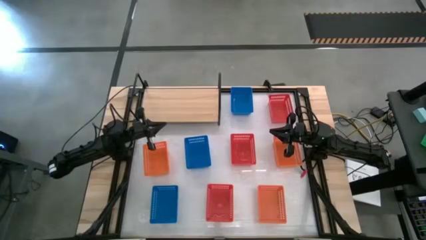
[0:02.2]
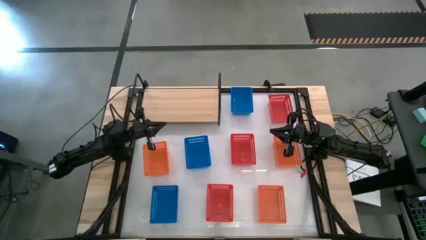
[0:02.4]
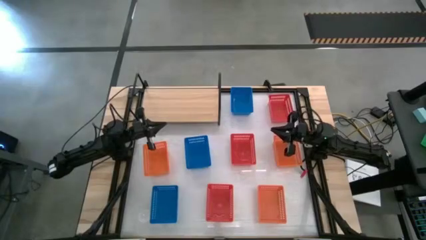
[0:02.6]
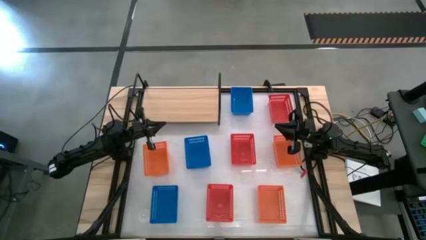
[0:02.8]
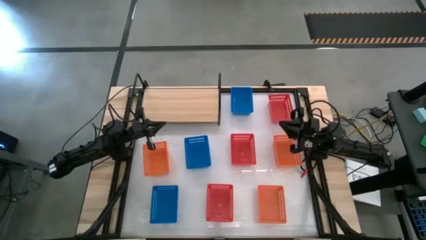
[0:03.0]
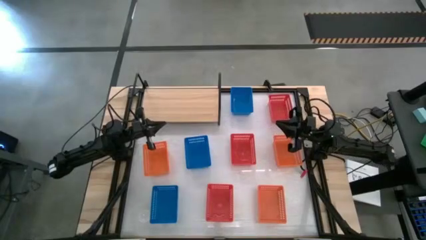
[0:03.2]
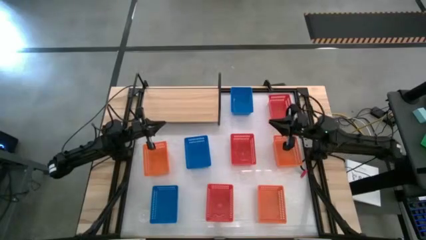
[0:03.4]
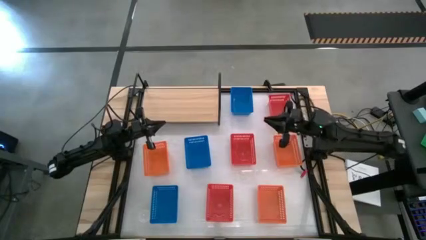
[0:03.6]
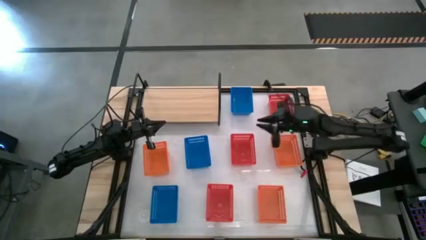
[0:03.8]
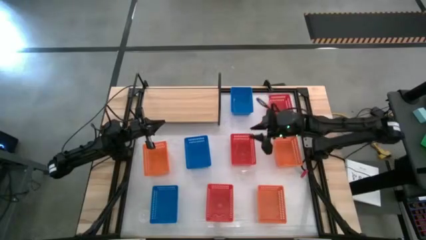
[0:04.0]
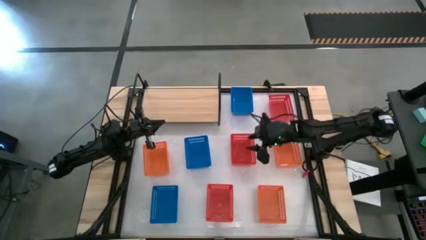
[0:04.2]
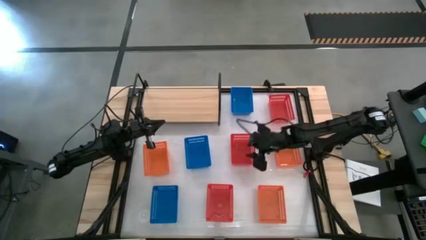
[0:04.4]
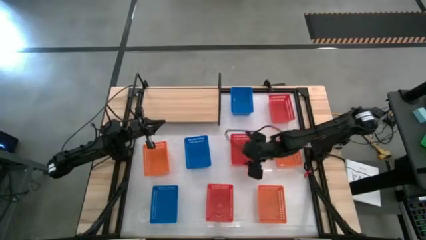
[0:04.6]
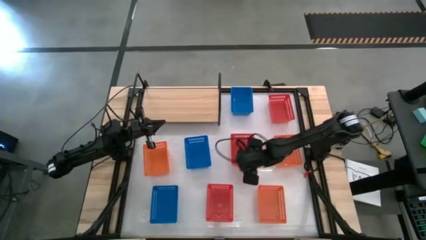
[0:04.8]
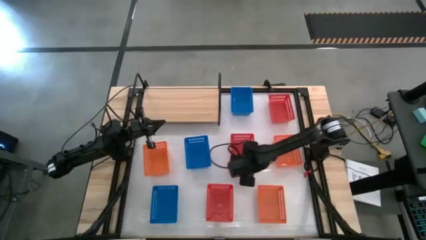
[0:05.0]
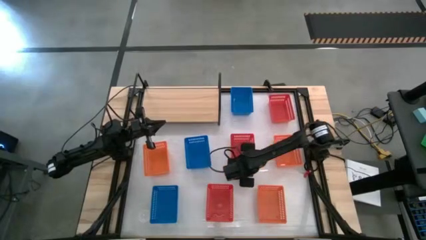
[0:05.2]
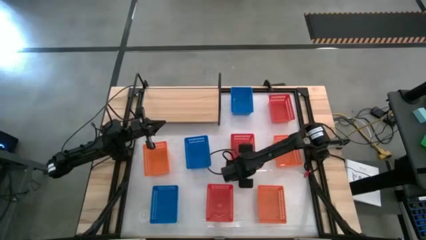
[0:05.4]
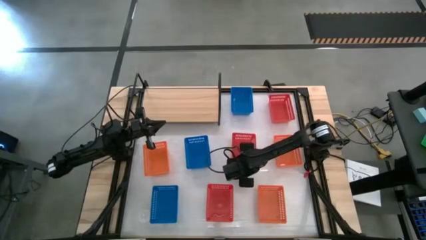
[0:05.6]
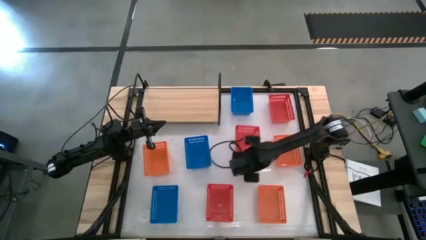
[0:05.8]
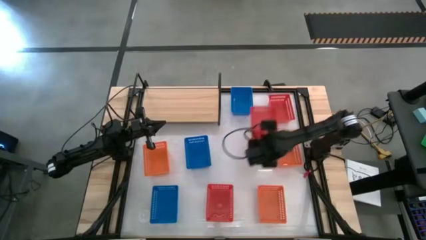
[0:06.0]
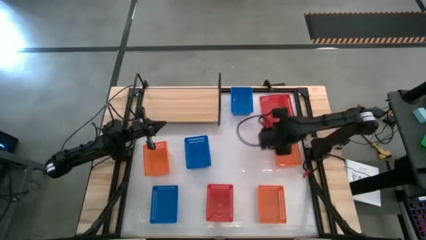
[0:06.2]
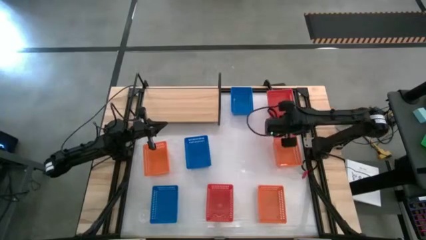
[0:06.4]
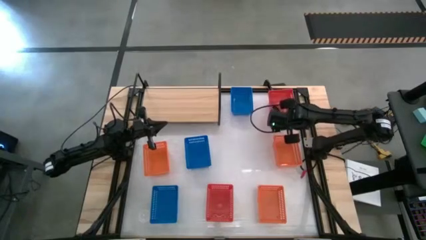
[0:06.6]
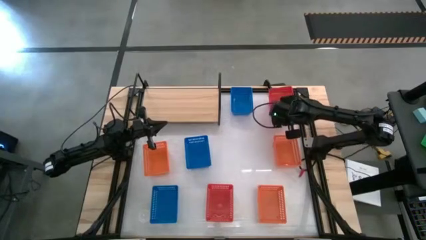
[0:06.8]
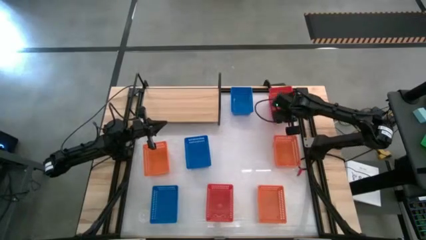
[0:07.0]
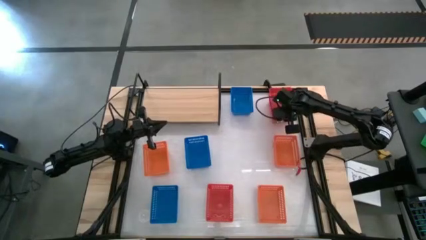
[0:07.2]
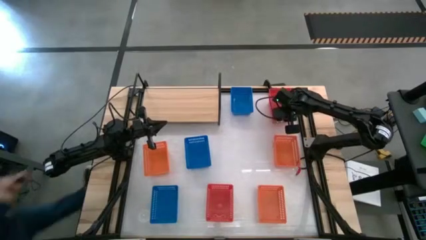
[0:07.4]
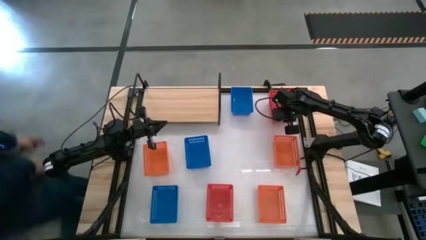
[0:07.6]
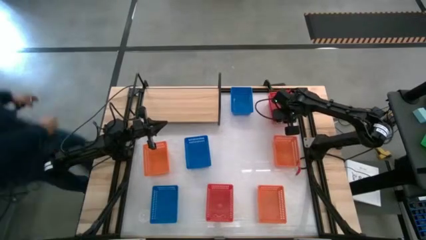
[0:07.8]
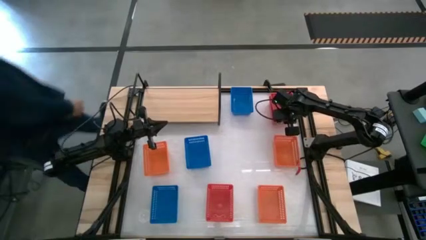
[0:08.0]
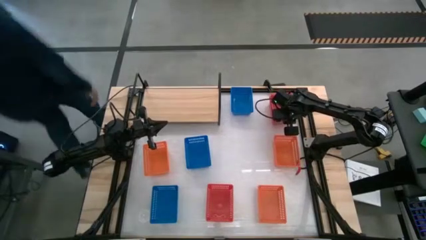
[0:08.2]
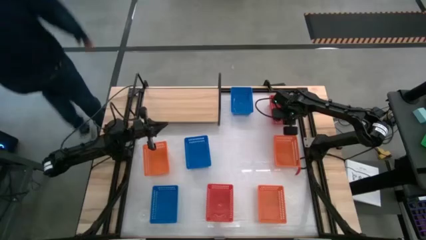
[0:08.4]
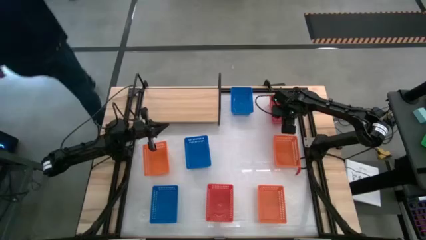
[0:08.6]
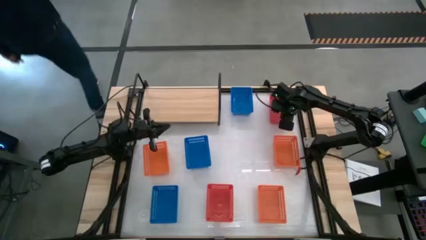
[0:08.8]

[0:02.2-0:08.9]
Task: Stack baskets on shelf by color
Stack the middle red bin on top of the top right red bin

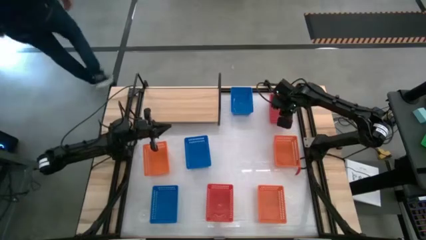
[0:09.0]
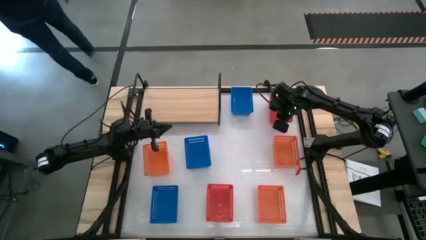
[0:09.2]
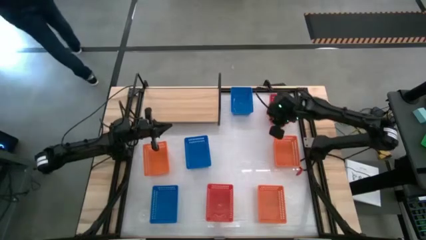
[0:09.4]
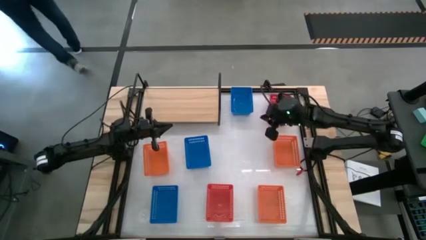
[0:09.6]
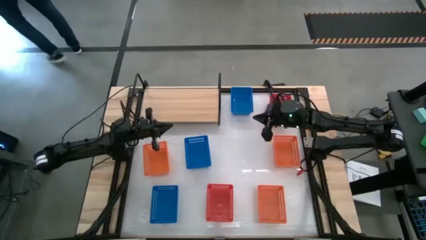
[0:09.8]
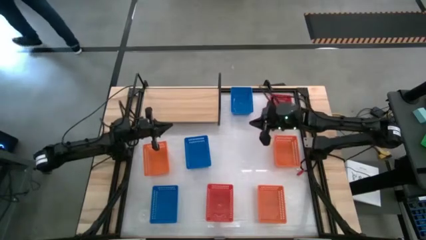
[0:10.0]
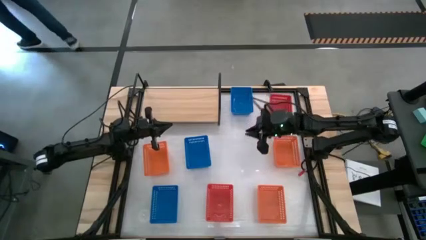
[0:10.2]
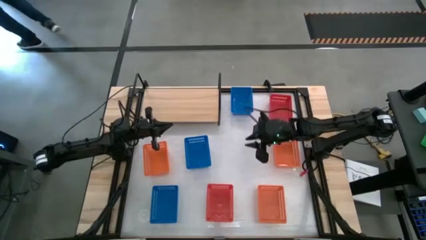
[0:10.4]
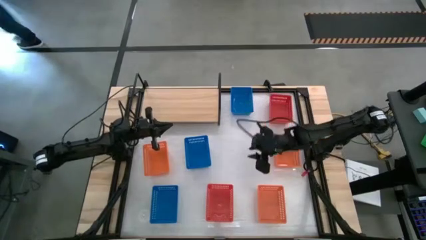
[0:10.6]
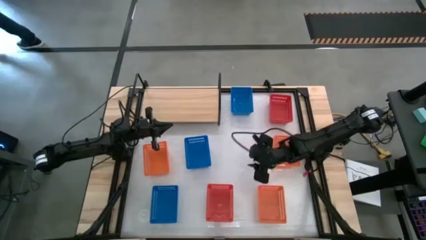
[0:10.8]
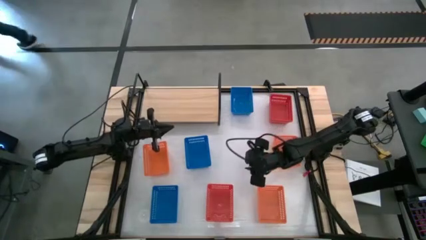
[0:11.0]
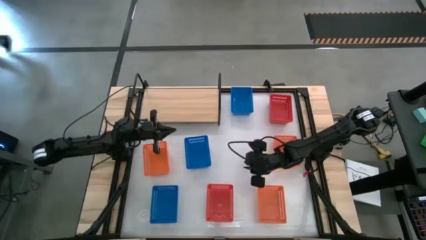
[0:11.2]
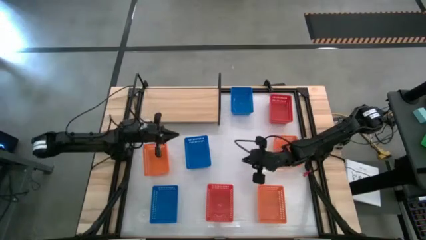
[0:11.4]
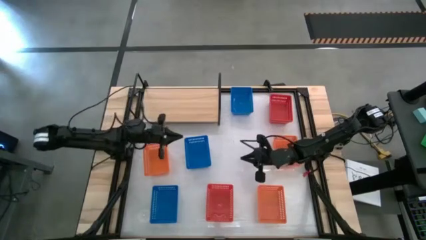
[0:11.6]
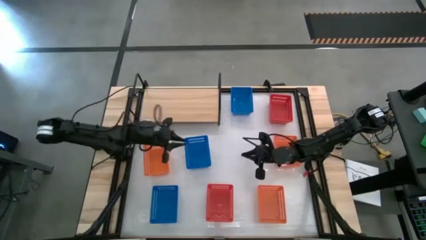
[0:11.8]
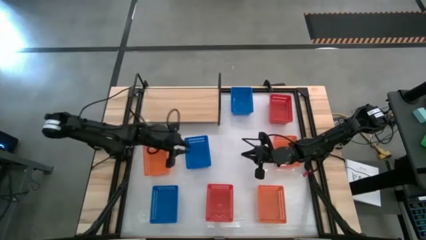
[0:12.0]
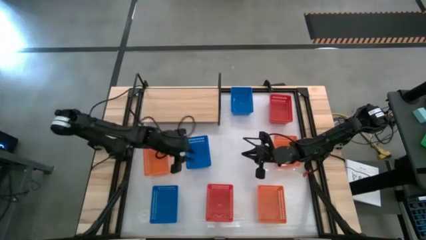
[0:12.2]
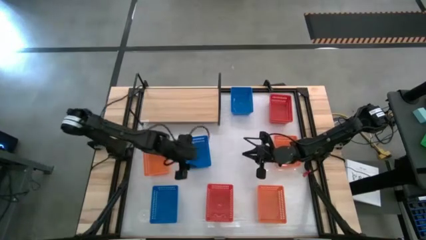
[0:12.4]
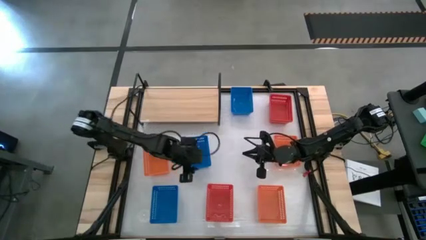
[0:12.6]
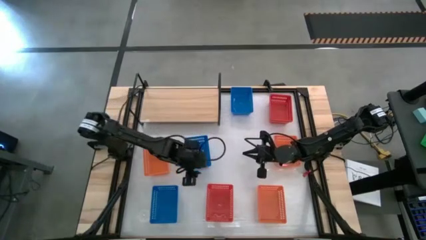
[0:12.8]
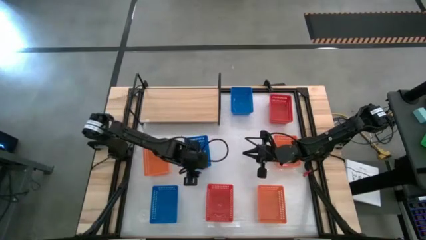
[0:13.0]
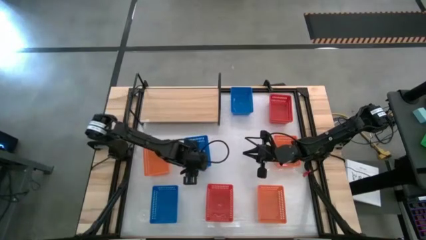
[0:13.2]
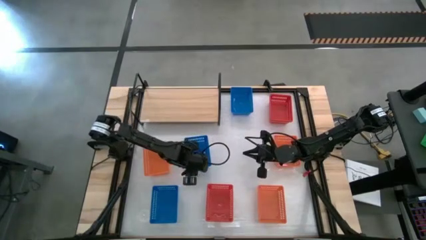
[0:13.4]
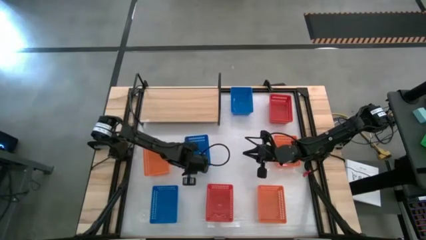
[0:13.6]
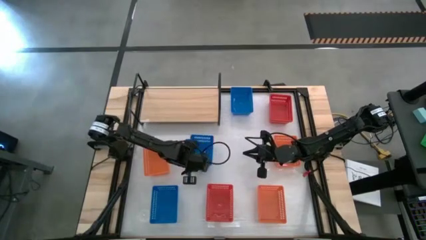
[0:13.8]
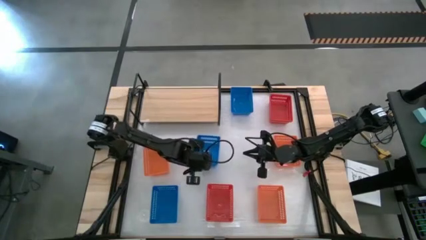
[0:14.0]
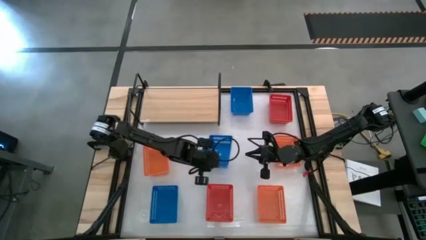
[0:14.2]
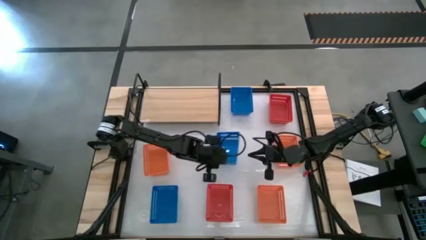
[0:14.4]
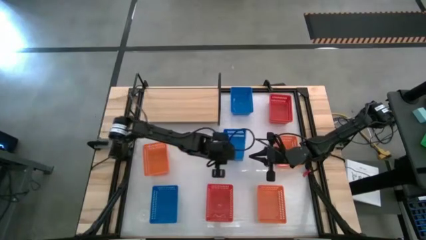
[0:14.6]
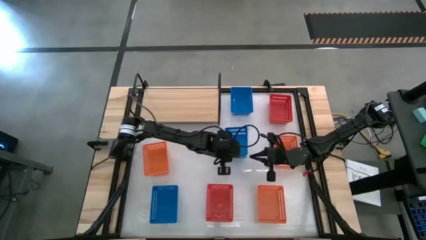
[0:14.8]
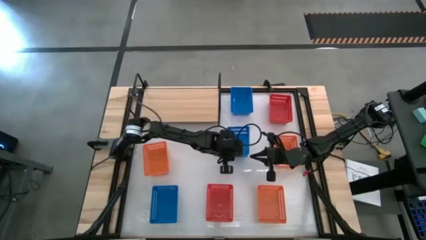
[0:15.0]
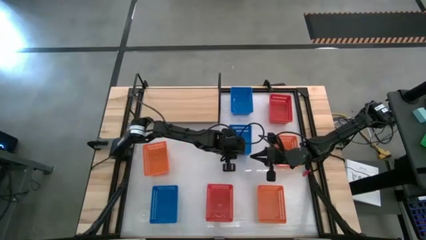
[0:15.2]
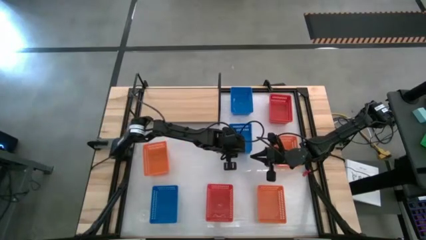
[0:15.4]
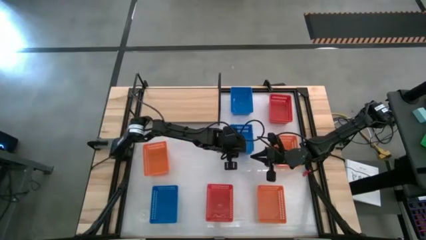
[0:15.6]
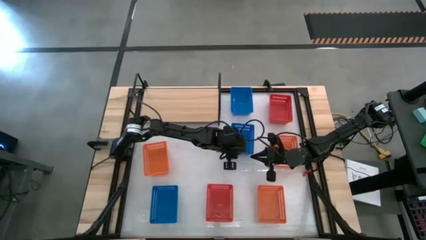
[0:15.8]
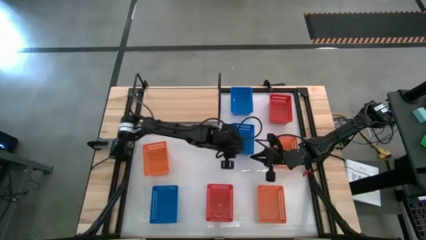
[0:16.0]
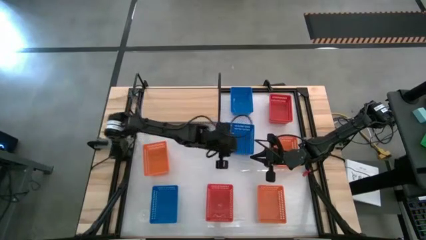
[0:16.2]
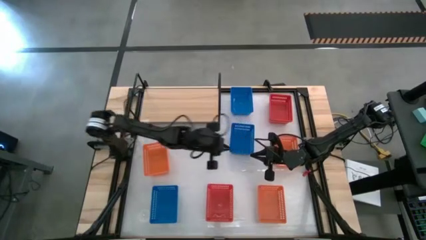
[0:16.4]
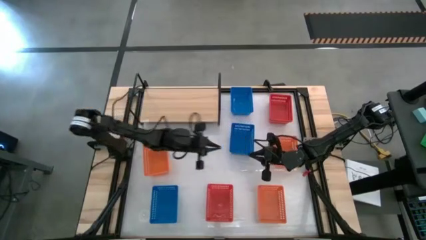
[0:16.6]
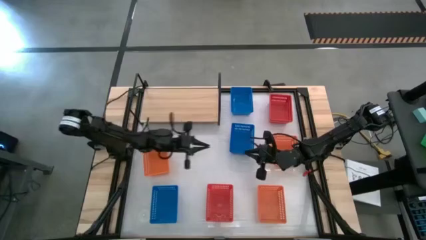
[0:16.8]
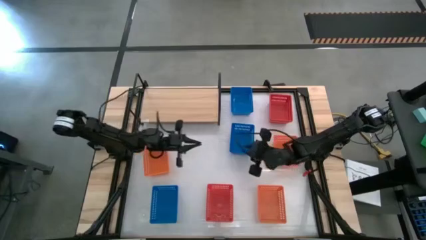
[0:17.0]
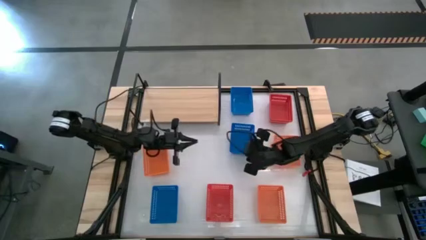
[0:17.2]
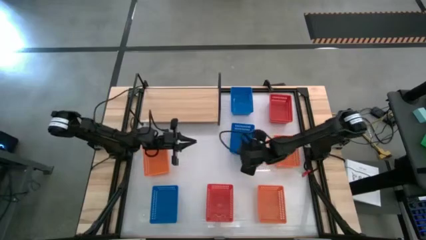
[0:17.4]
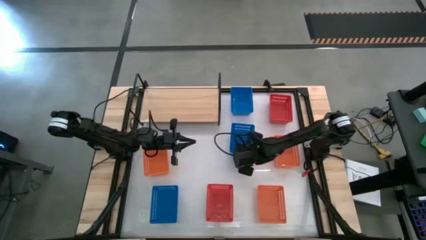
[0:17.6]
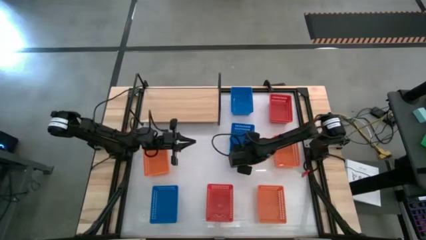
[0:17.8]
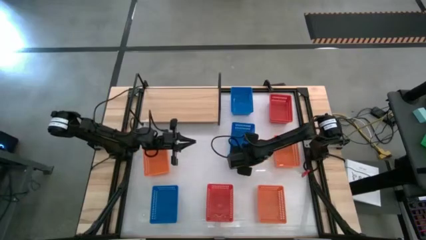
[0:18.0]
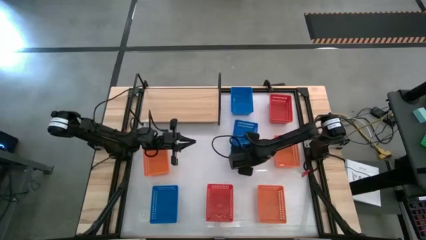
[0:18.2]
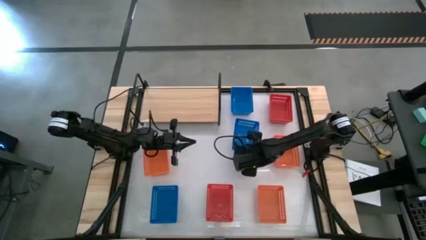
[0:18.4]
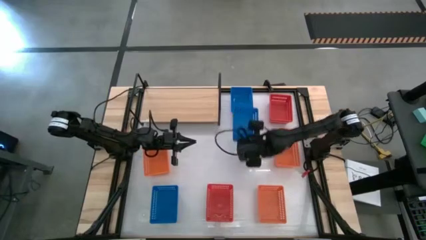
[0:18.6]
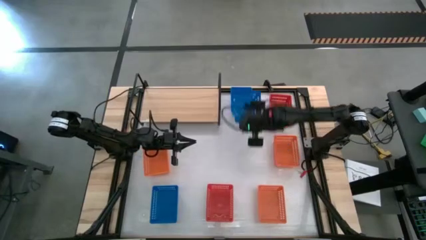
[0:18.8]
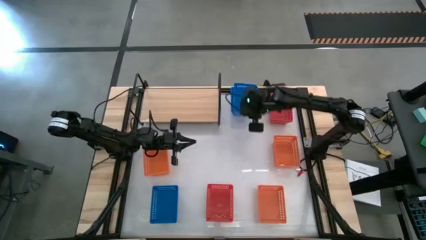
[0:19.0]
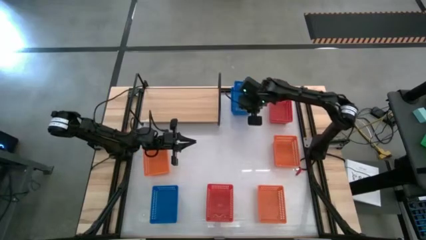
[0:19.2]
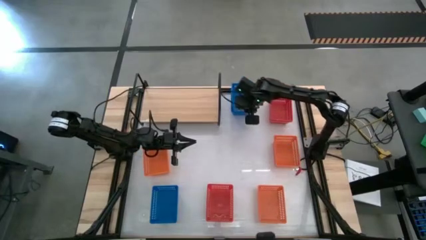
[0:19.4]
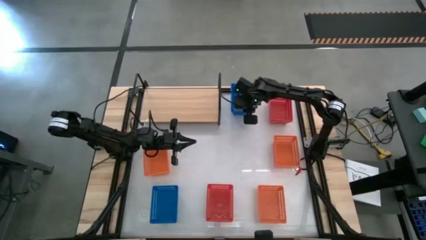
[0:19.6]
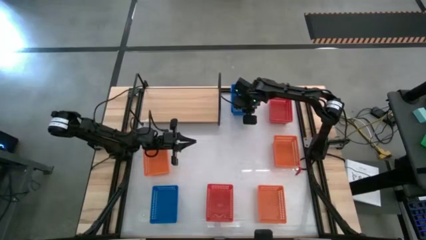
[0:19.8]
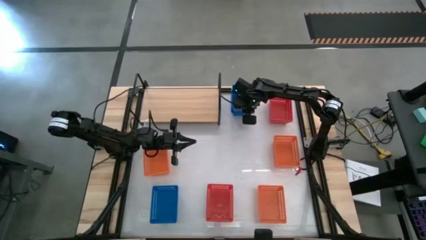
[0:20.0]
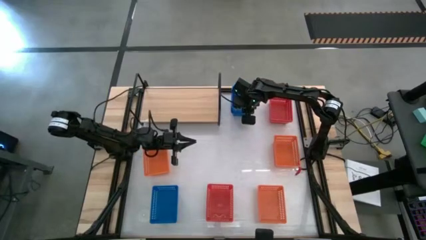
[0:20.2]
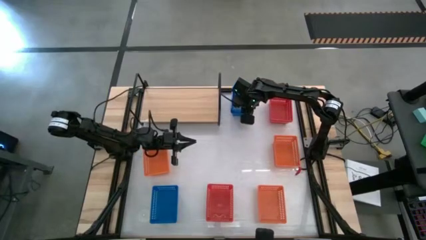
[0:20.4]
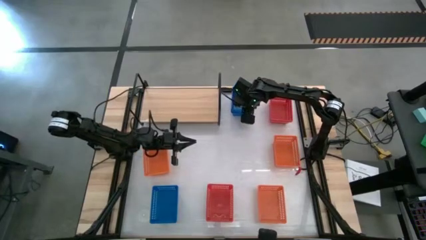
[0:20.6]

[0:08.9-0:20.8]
Stack the middle blue bin on top of the top right blue bin
